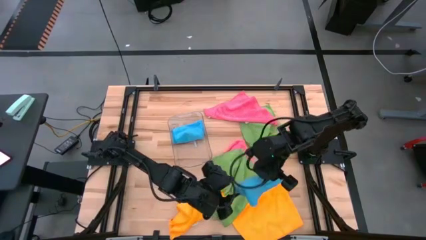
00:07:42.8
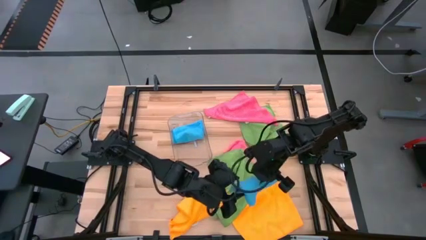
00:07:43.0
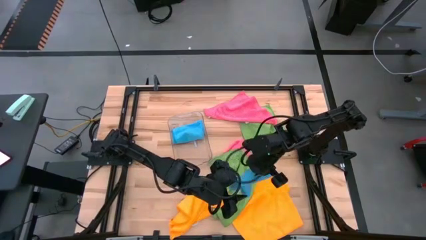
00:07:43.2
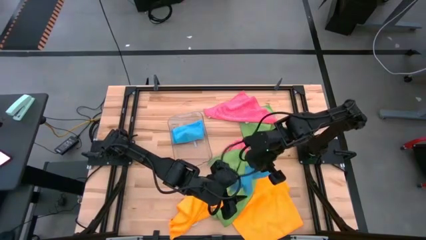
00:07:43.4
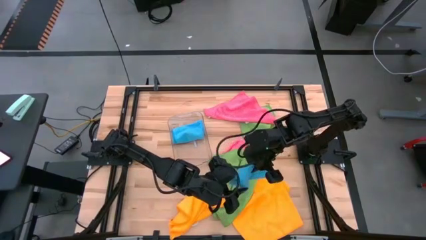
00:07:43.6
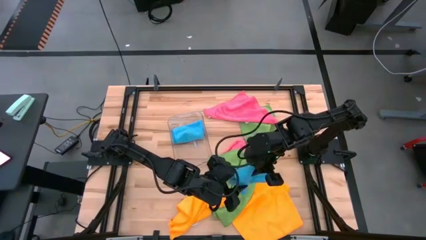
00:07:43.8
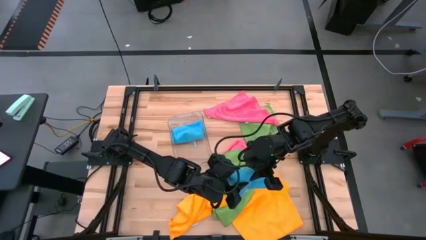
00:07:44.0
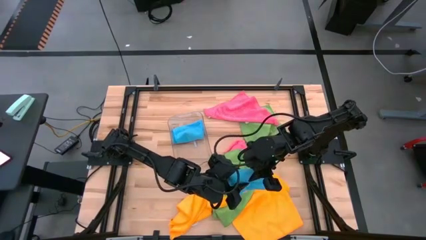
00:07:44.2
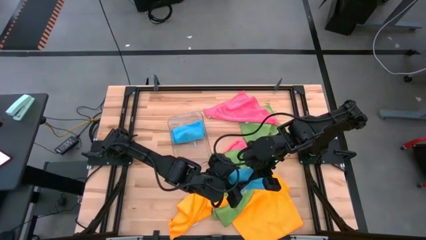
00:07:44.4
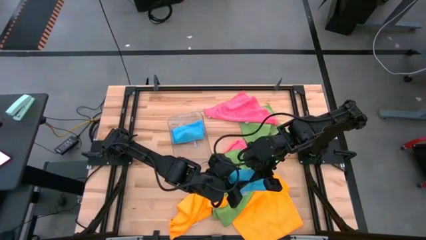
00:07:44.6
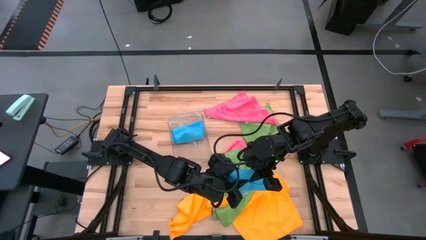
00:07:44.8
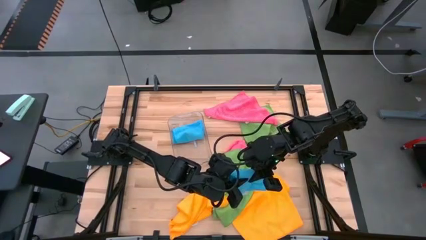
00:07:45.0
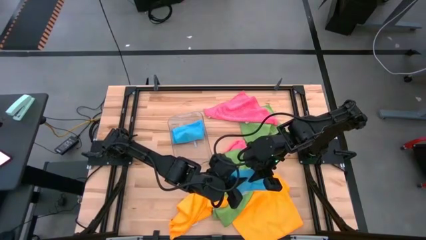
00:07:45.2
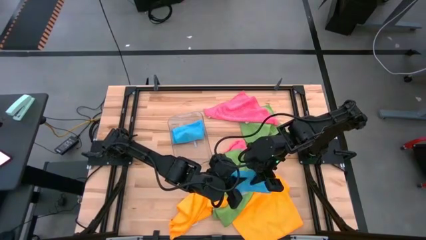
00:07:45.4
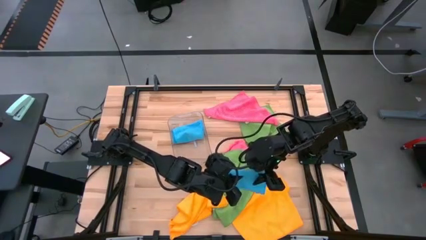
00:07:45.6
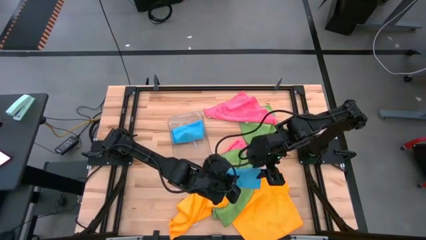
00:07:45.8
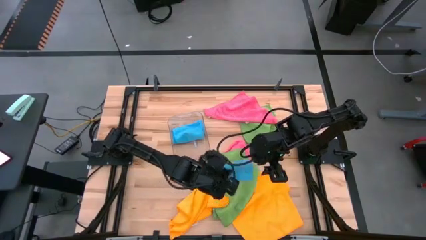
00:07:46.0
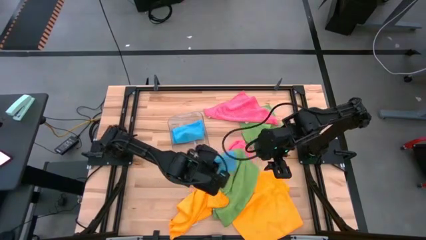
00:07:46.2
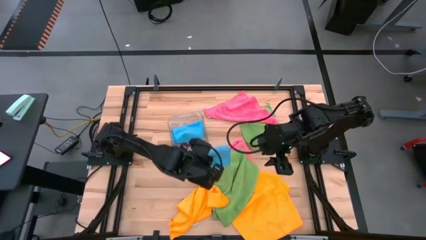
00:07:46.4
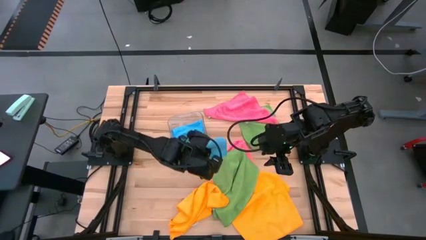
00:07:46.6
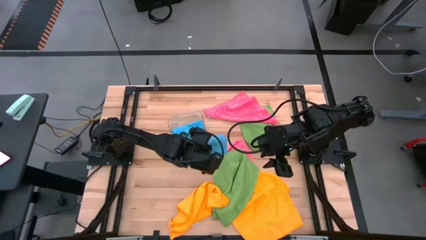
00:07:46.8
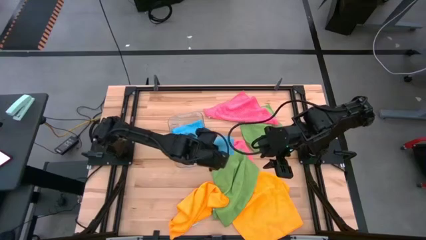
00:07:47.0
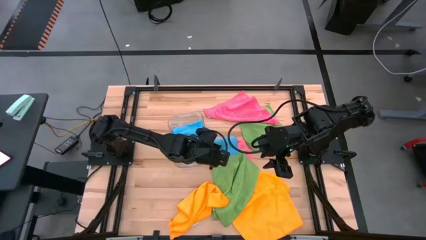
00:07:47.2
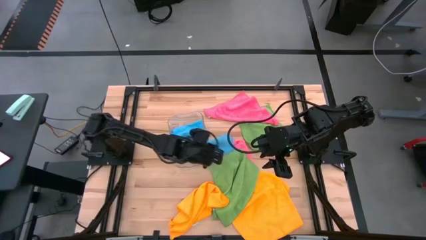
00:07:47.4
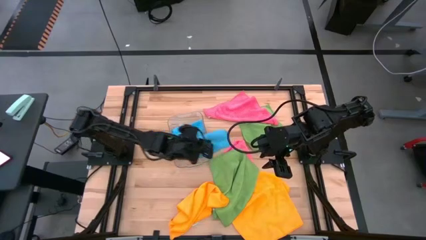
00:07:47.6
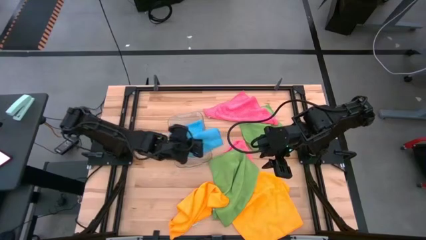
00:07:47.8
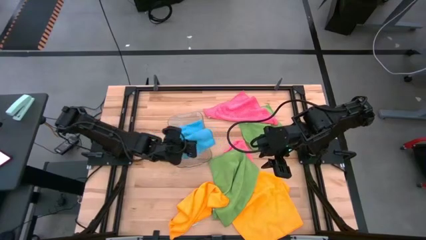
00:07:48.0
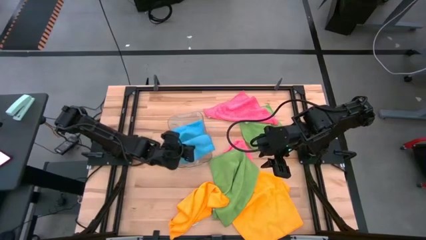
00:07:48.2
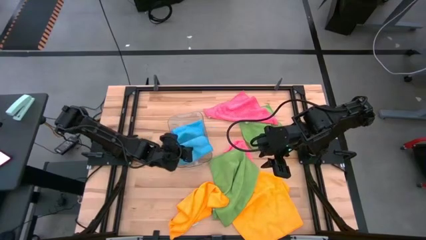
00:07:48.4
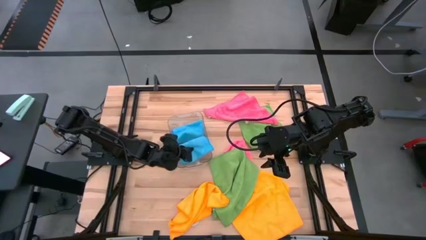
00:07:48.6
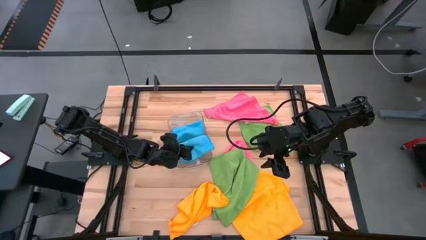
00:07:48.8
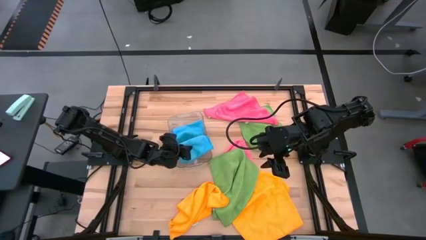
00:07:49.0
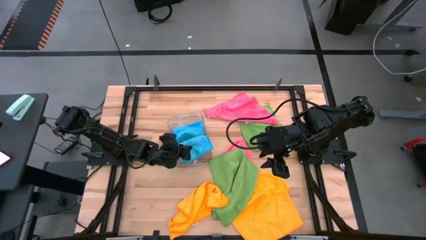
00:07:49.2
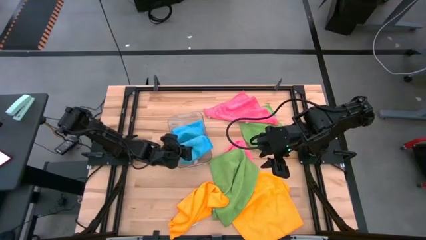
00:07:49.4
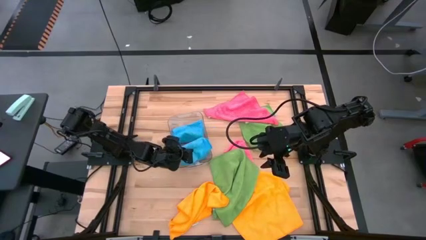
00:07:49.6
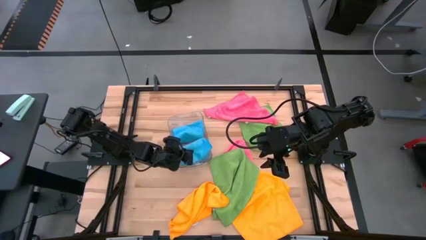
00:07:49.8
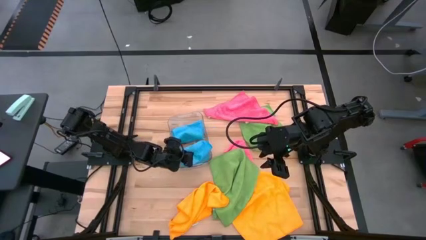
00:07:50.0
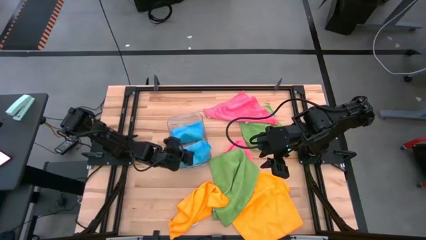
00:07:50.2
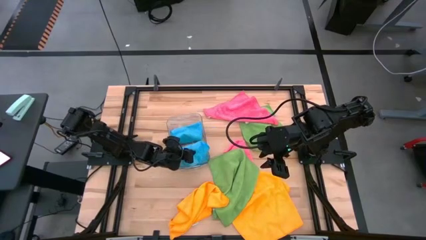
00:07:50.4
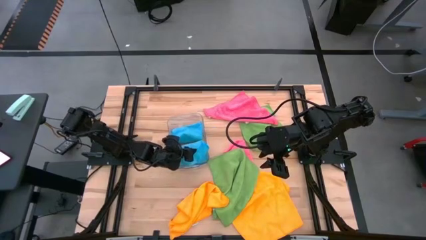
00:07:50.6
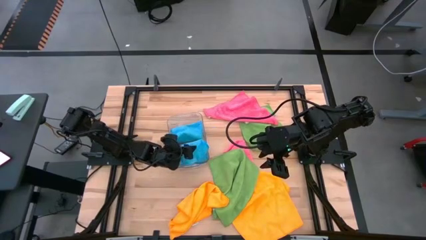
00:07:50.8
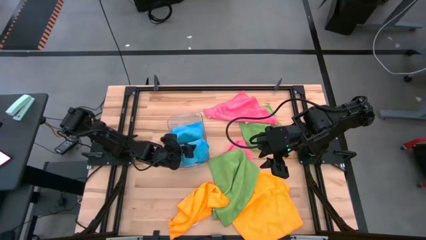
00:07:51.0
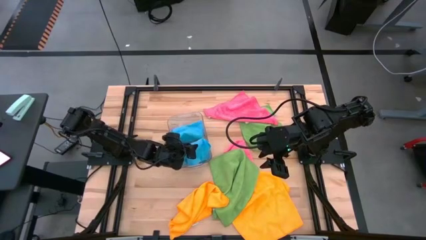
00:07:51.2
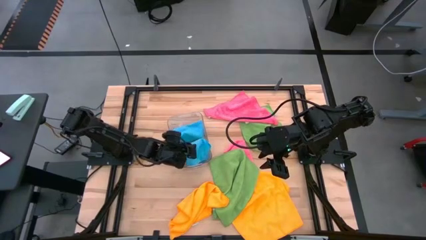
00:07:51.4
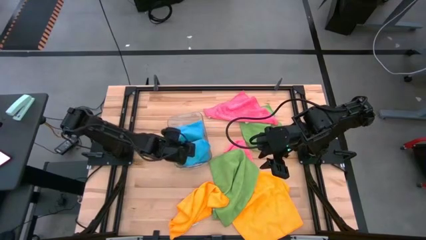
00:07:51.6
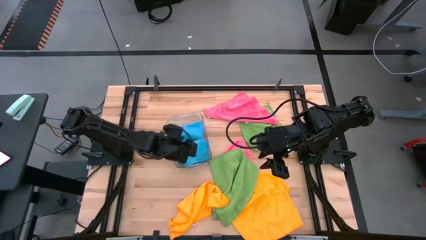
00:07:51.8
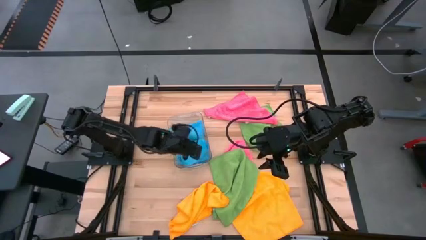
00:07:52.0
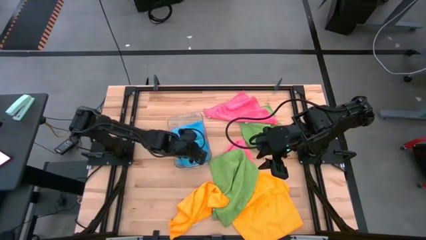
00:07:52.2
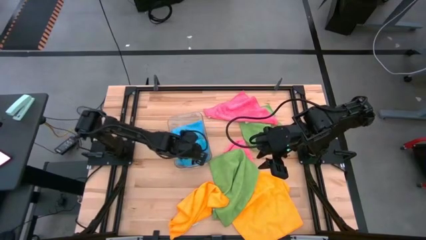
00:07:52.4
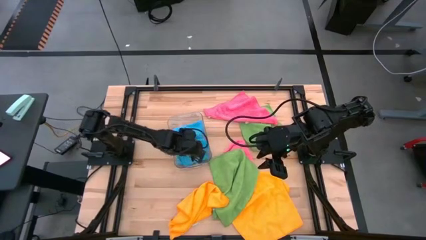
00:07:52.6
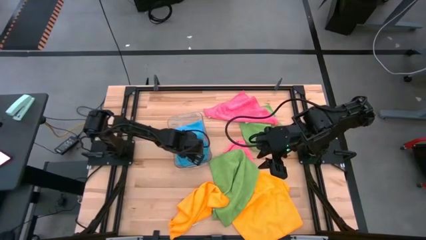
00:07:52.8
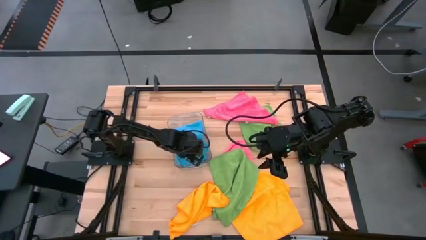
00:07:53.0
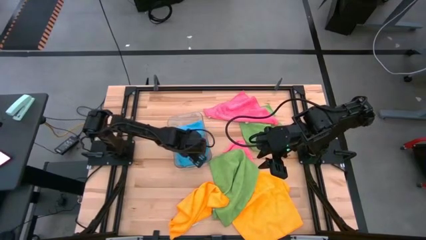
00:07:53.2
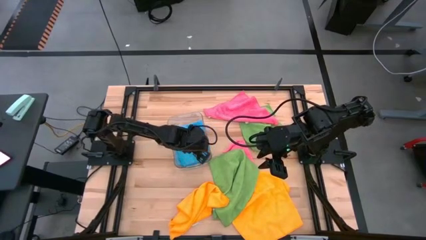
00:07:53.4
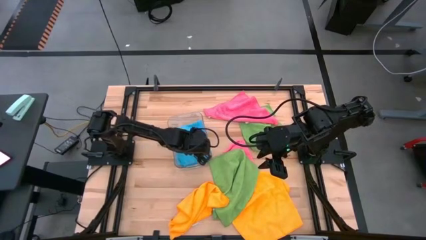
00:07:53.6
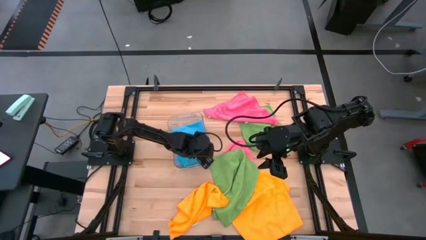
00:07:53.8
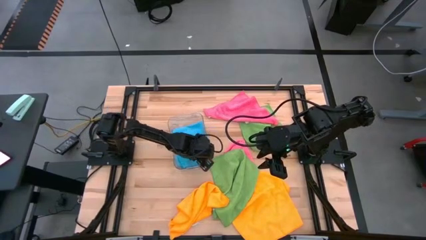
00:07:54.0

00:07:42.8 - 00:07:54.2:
Task: Fold microfiber towels
Put the blue towel into the transparent bin
